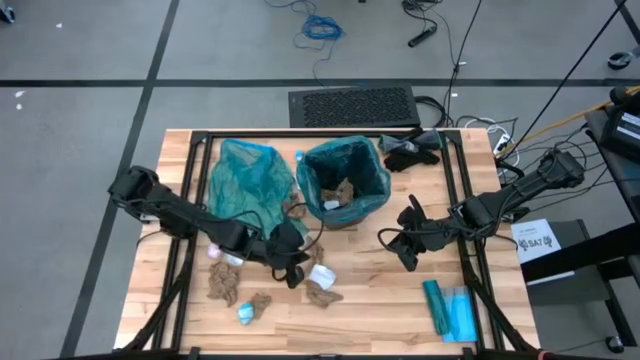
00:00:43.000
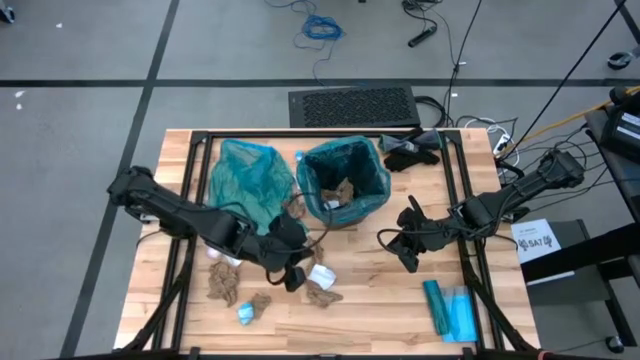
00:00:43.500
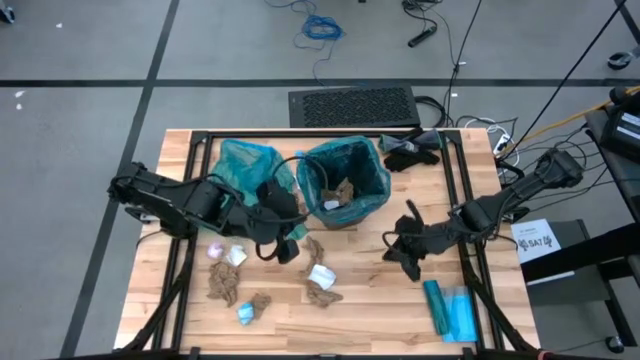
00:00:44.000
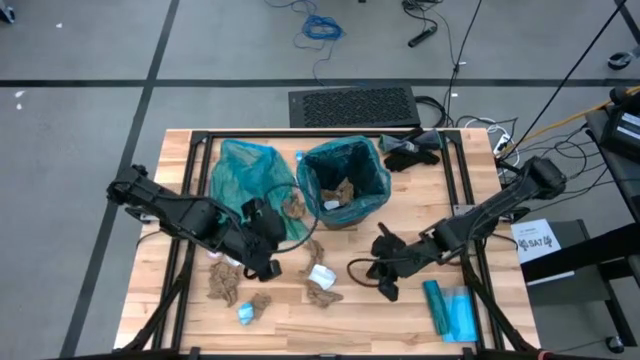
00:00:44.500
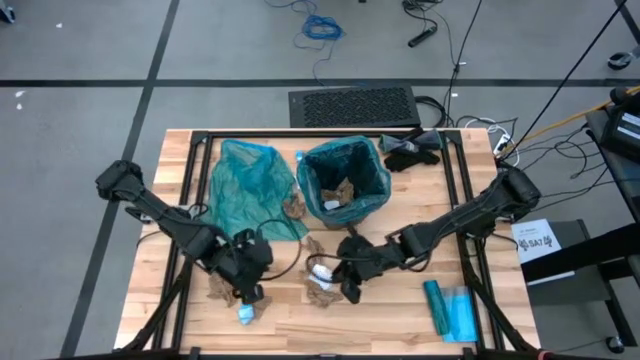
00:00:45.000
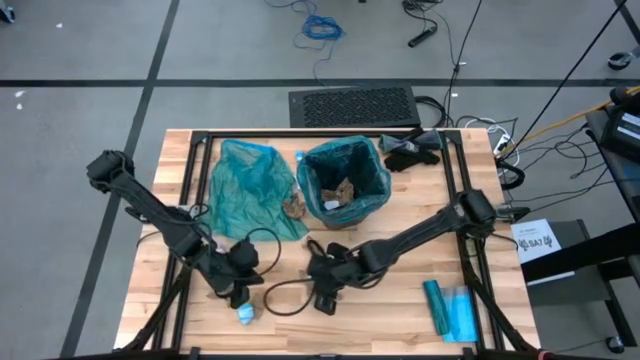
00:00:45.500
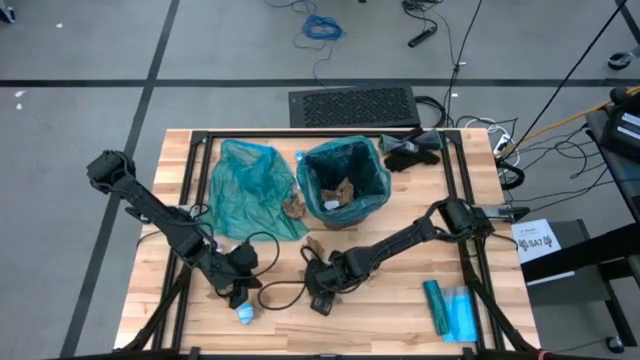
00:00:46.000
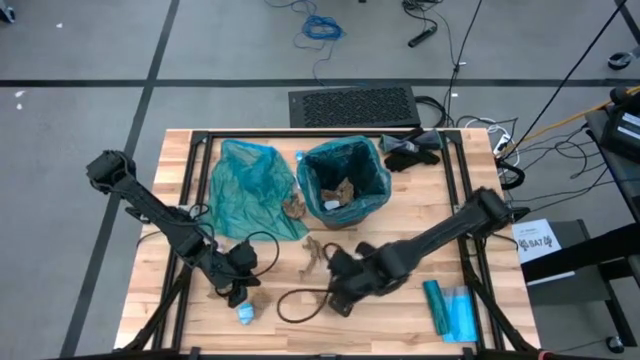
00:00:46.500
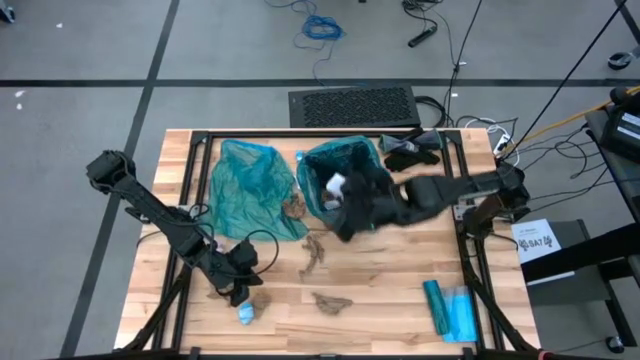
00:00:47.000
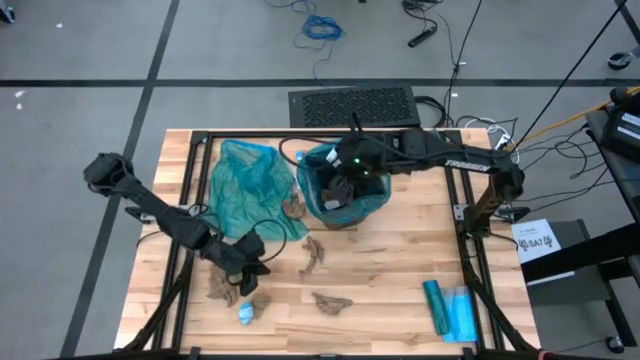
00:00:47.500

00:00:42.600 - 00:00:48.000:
Task: place trash/remove bag and relplace
Put the white paper into the trash bin

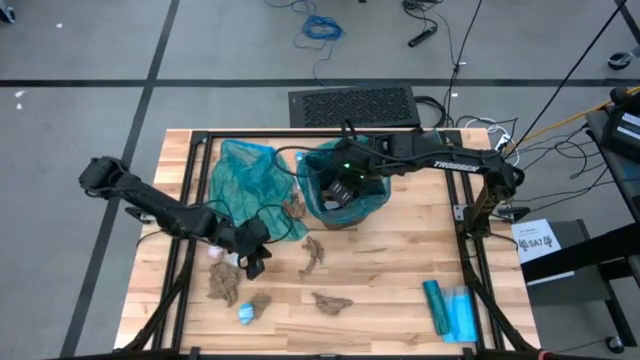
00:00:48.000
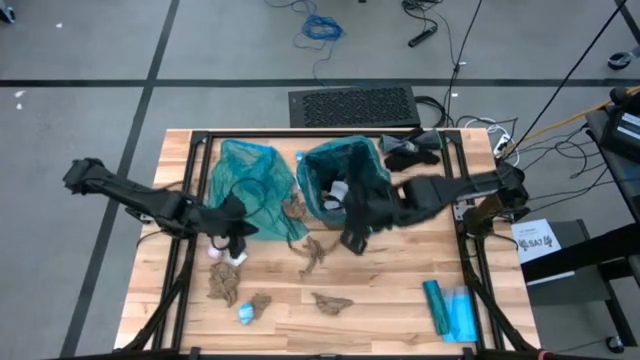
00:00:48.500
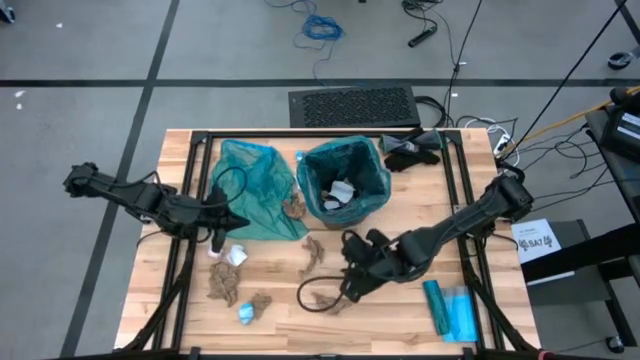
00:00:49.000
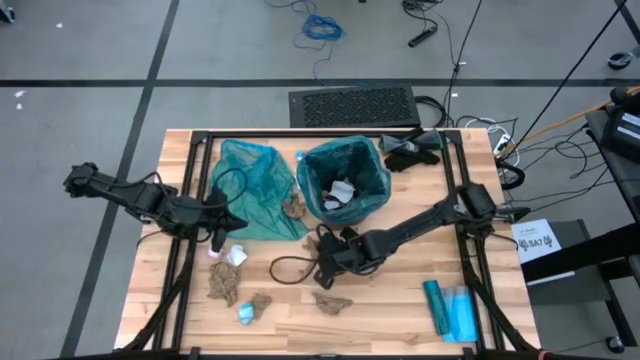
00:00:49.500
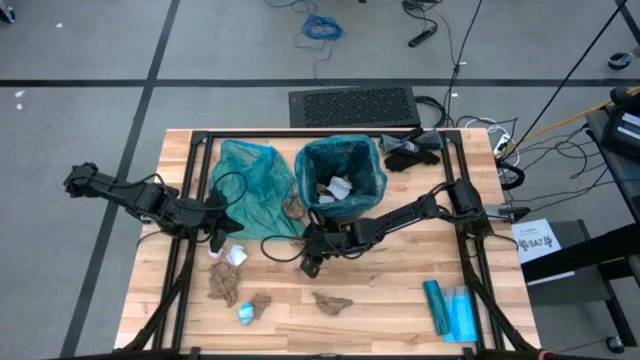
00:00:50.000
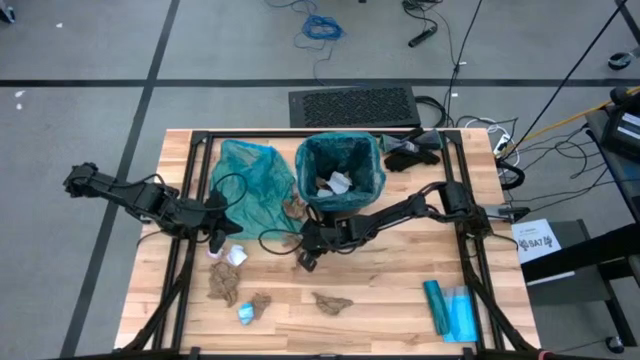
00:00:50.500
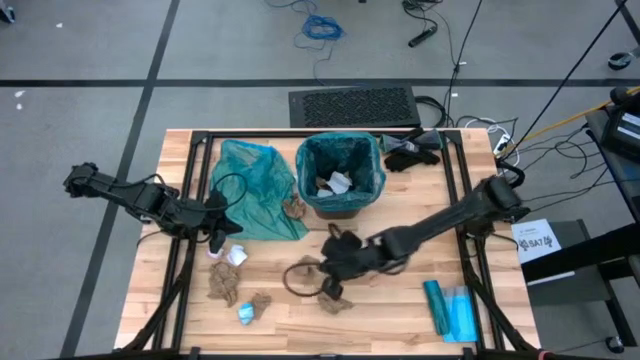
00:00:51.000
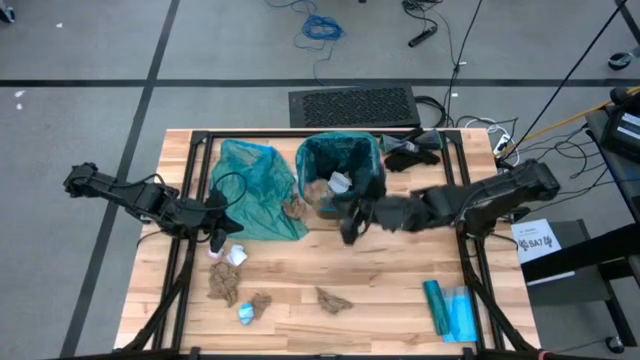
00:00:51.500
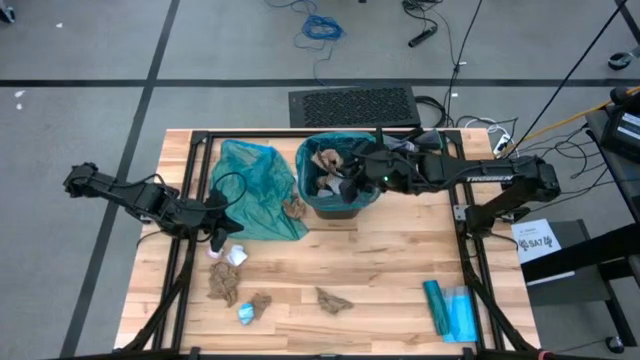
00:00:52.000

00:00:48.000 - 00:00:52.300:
Put the brown napkin into the trash bin

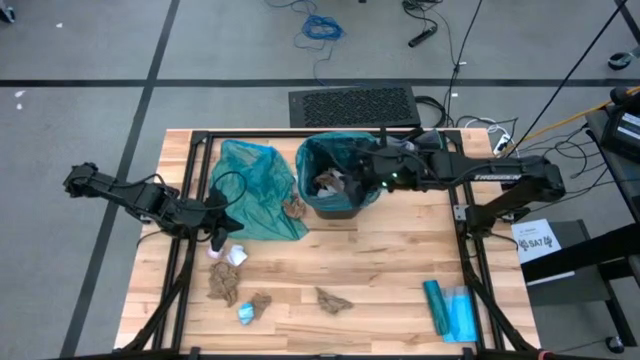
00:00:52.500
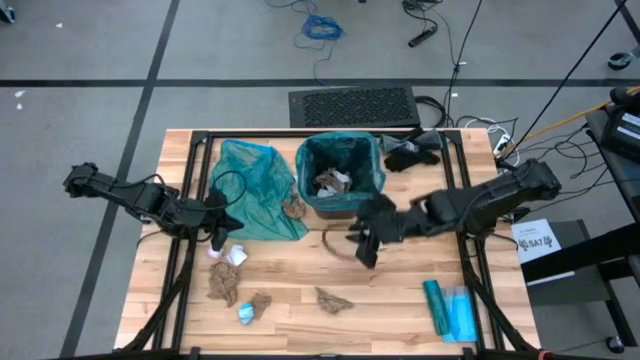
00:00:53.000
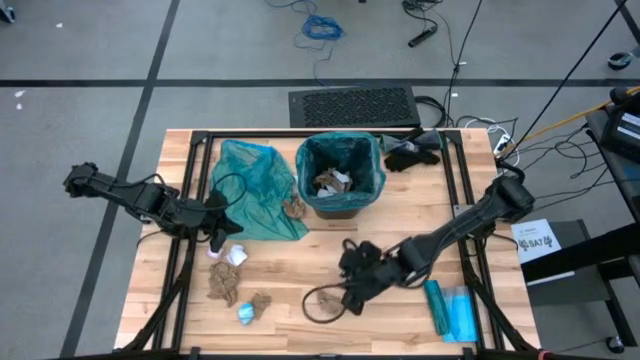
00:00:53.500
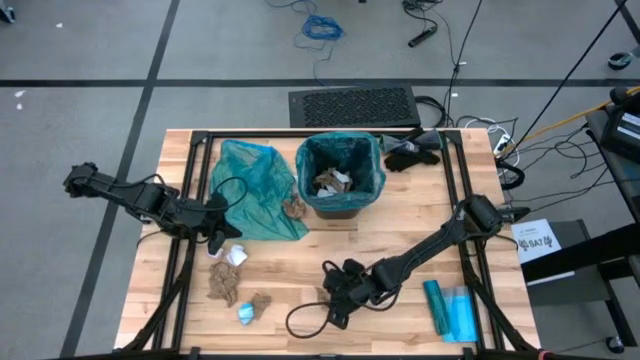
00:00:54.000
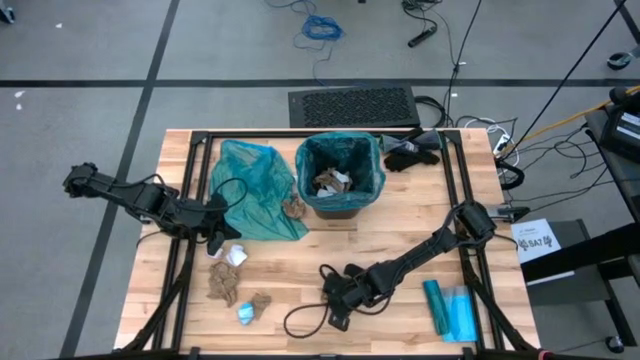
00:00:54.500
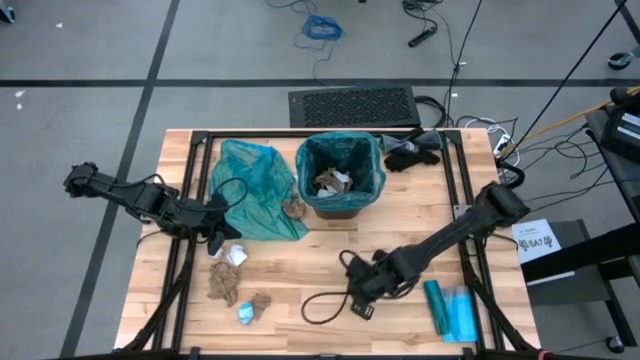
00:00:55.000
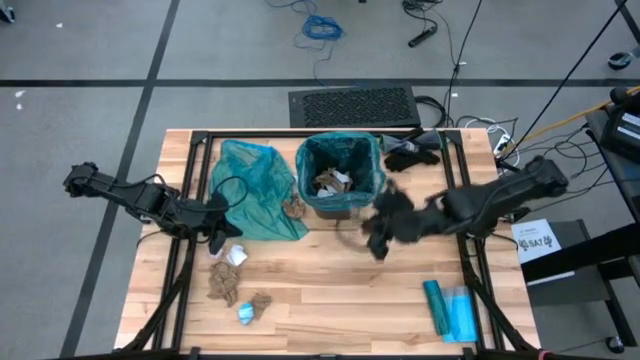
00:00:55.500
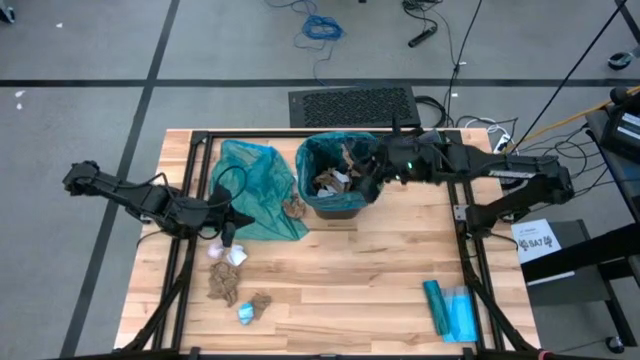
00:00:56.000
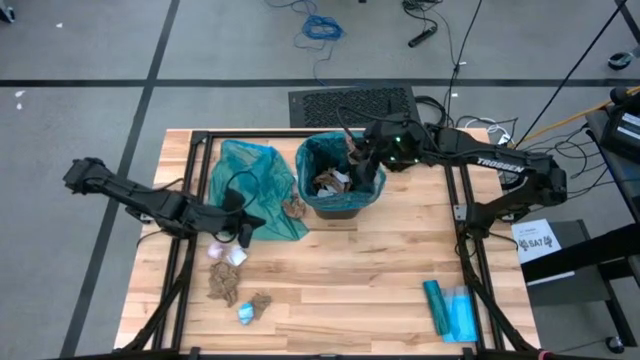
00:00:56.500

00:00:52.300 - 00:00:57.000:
Put the brown napkin into the trash bin

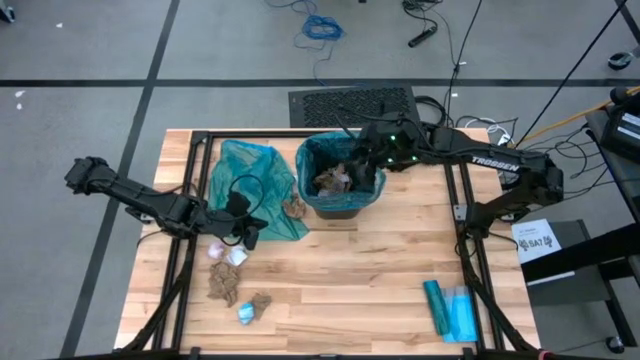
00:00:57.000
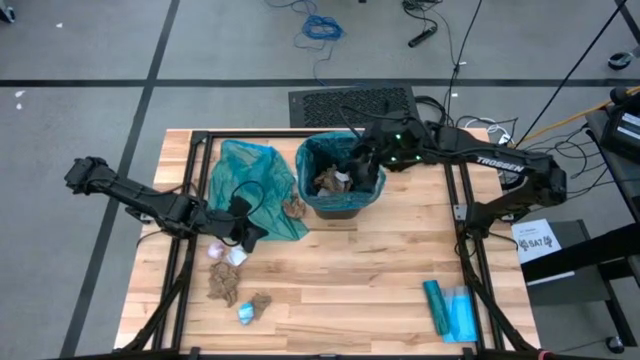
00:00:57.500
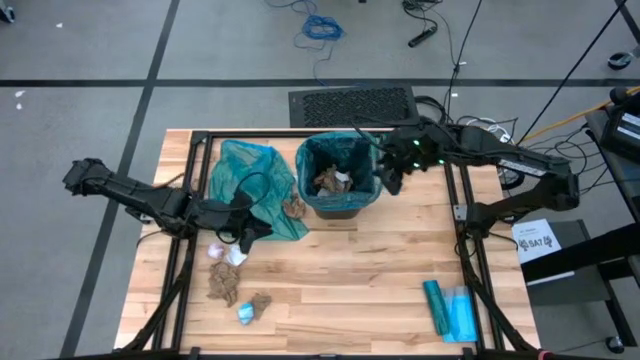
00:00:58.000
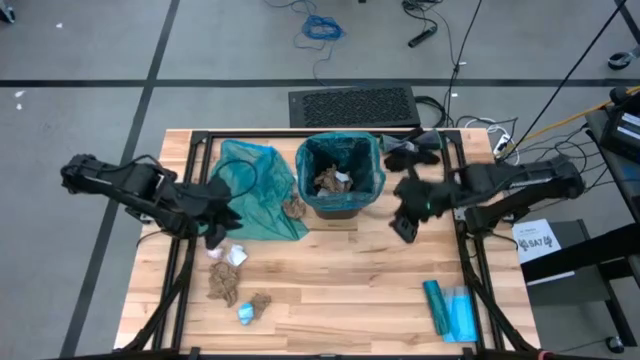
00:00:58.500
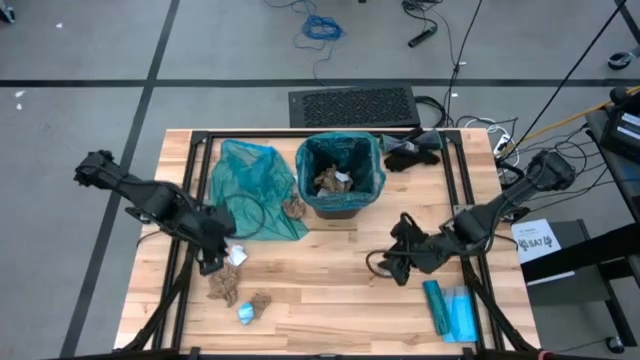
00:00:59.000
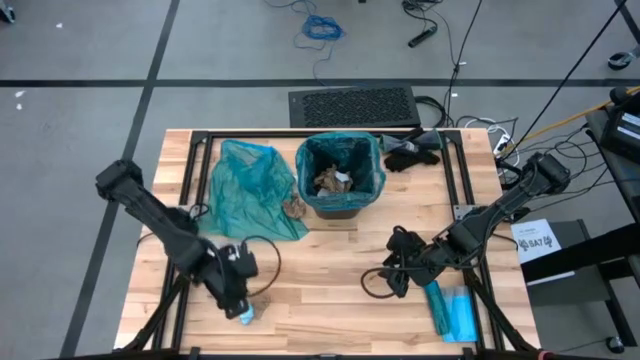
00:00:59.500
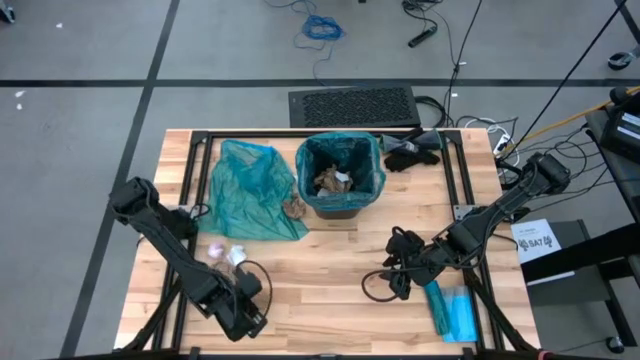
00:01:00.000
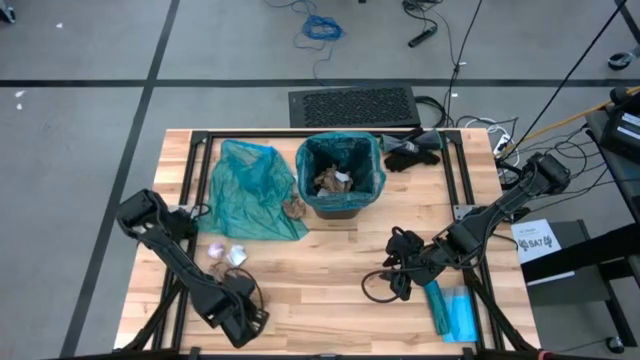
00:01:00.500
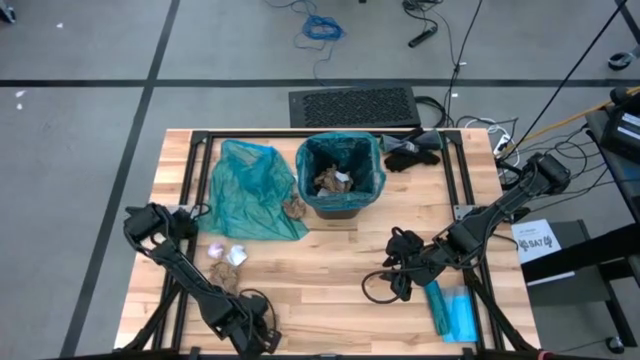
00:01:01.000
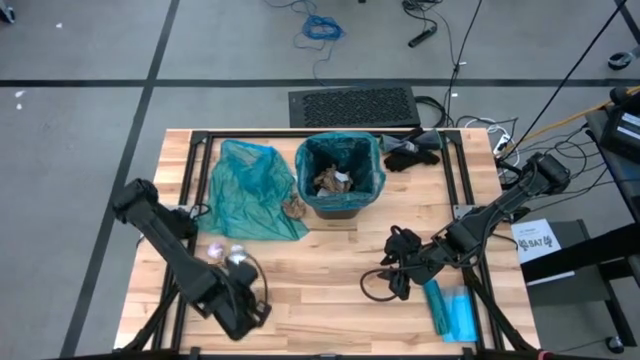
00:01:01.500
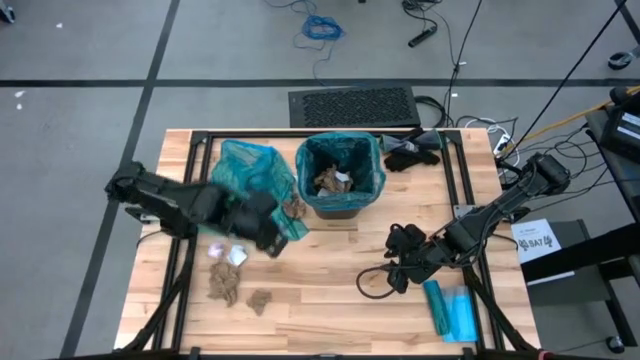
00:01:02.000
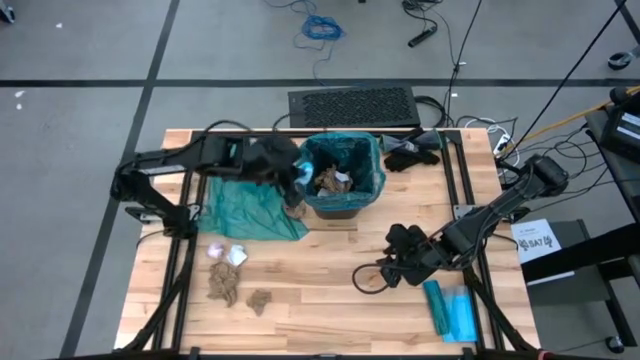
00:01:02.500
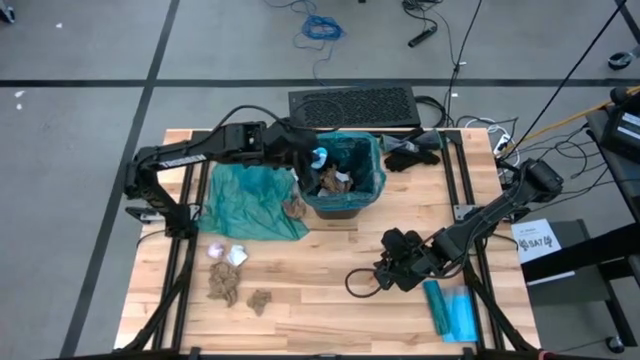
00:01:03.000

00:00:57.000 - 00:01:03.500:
Put the blue trash bag into the trash bin
